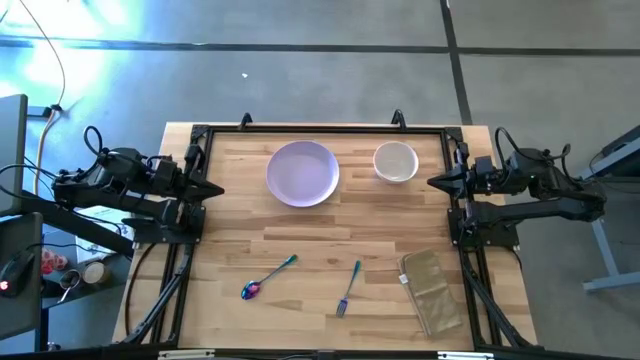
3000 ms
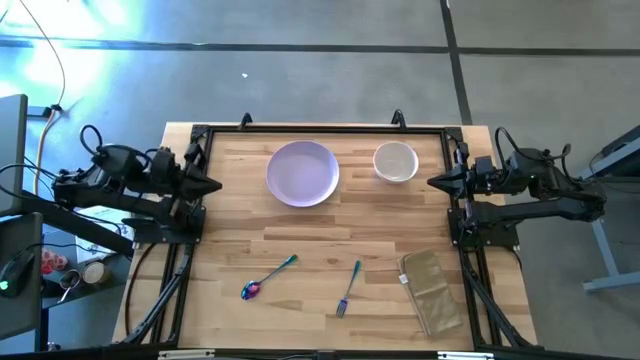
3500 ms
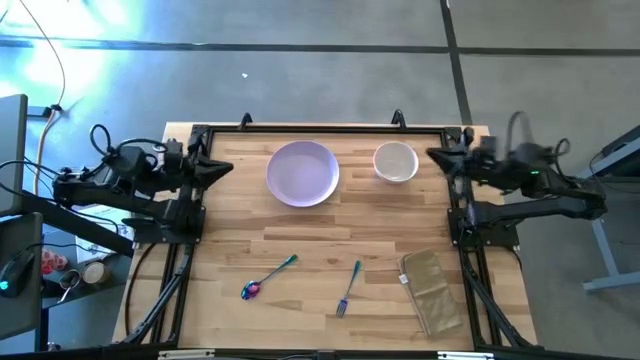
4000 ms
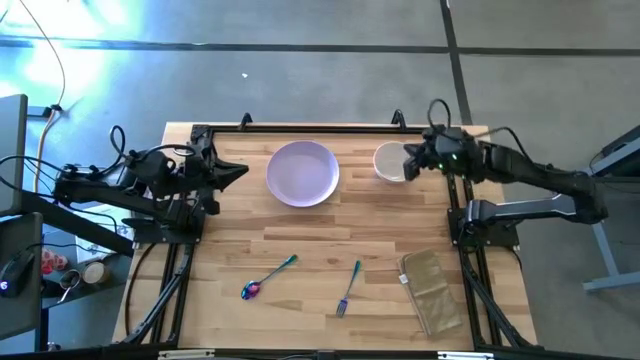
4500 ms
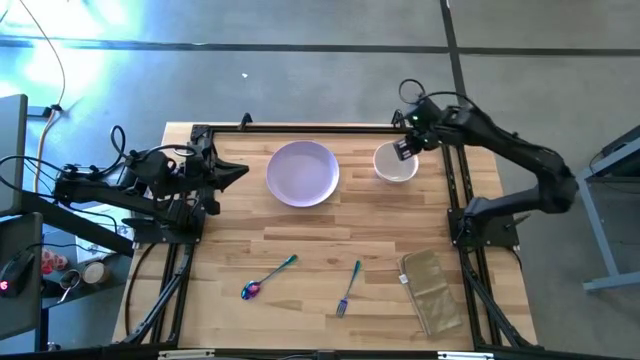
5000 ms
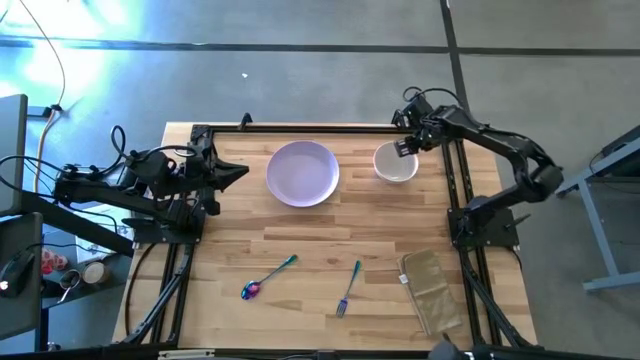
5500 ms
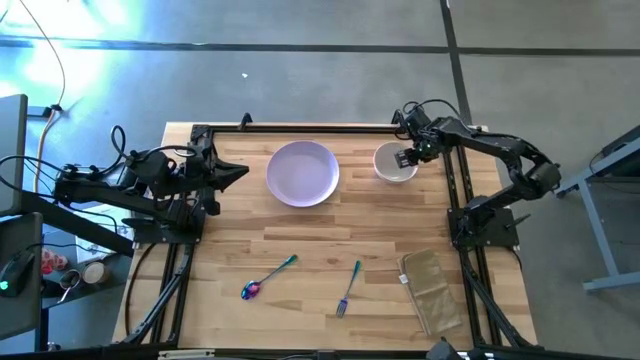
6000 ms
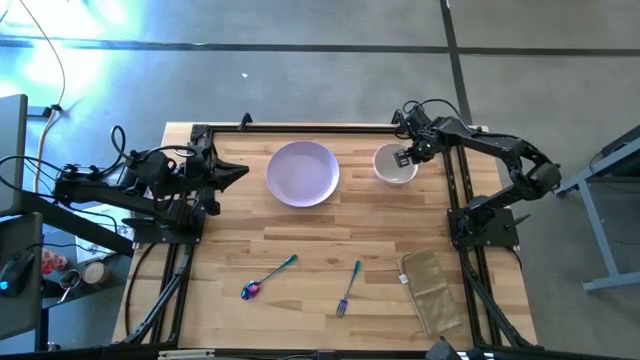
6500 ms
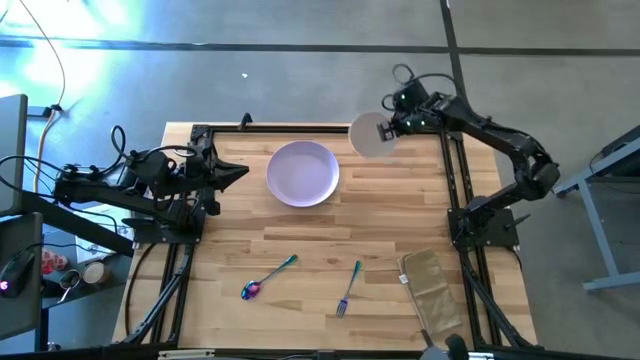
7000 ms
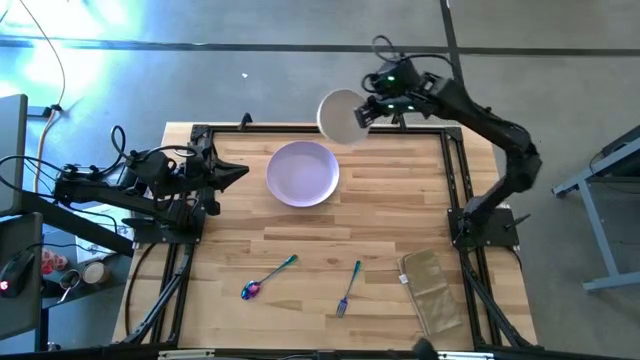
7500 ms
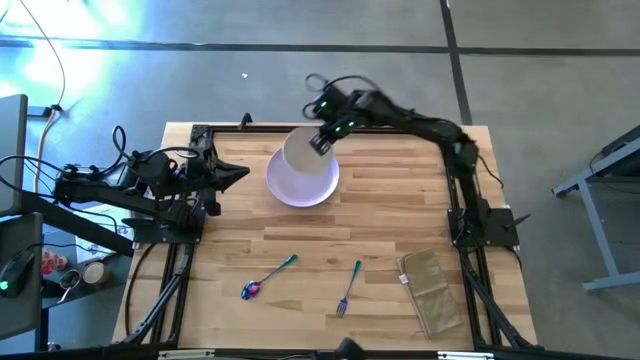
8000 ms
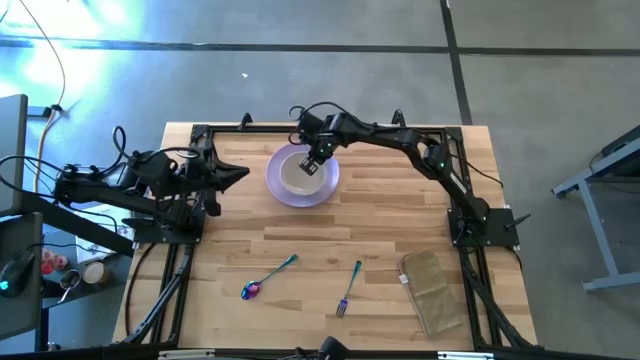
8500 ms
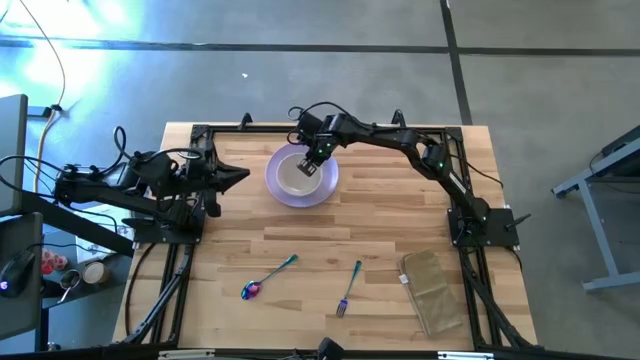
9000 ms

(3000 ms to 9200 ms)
Task: Set table place
Put the white bowl in the center of the violet plate

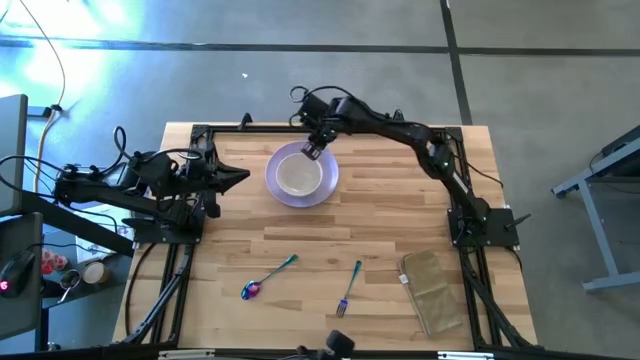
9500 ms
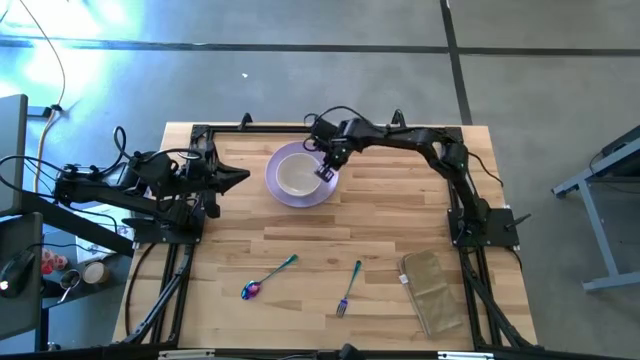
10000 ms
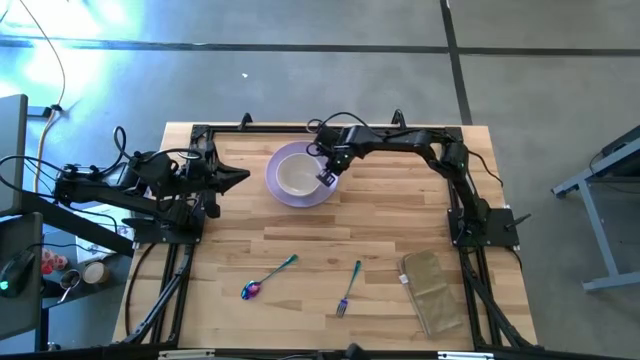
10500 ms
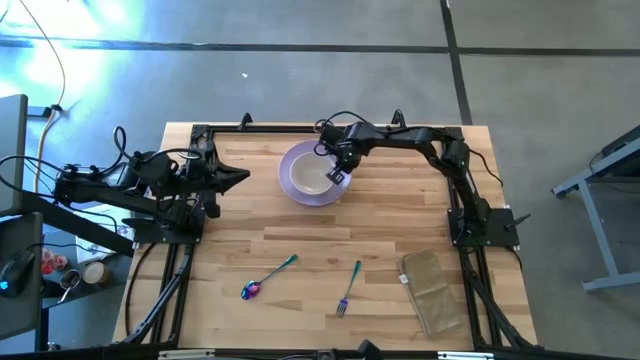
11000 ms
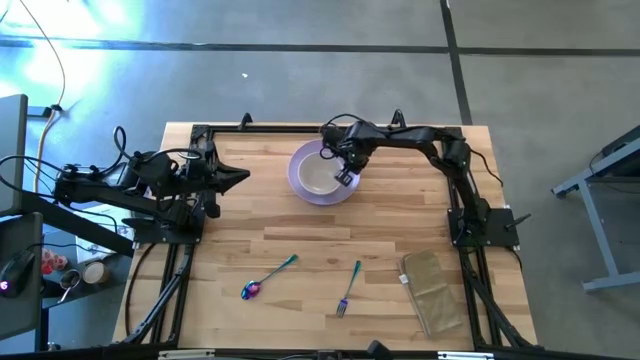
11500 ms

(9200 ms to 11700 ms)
Adjust the violet plate

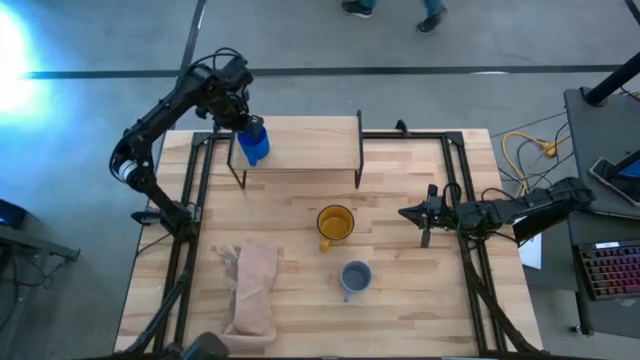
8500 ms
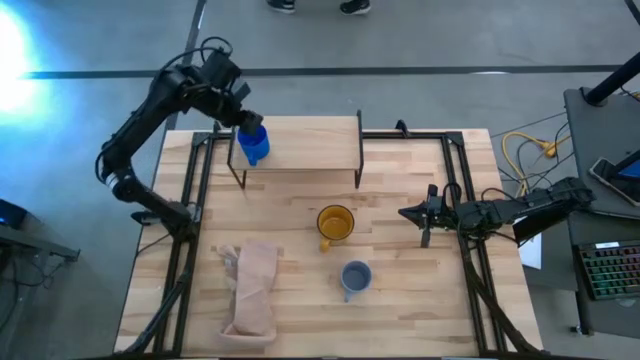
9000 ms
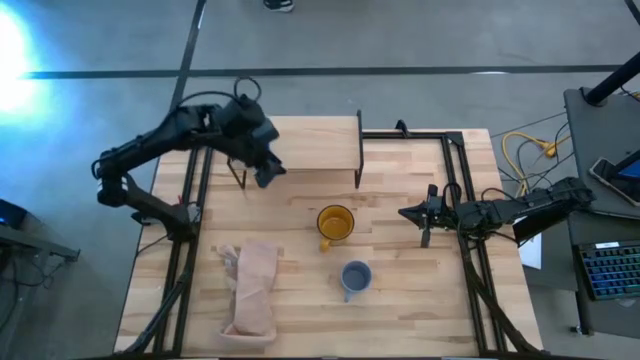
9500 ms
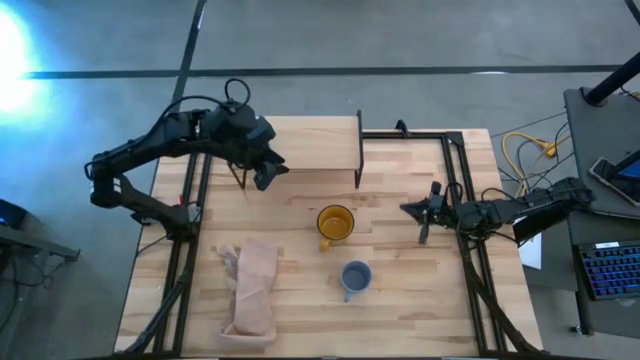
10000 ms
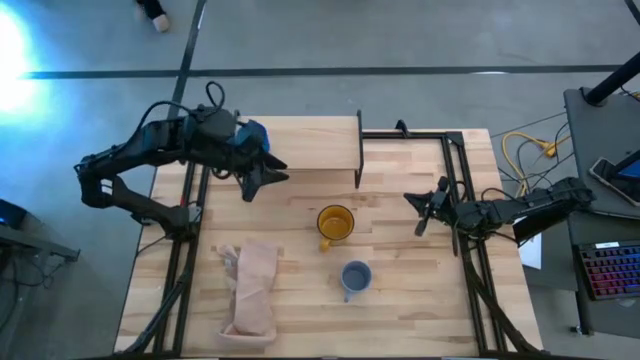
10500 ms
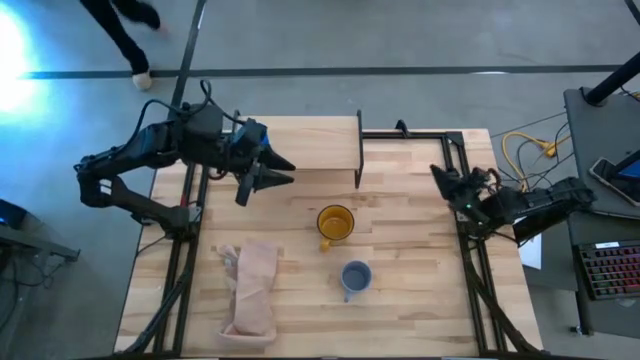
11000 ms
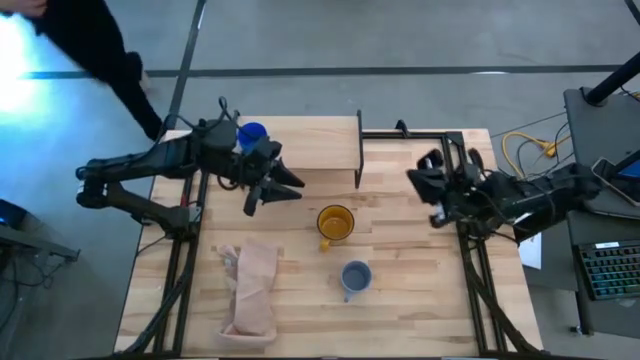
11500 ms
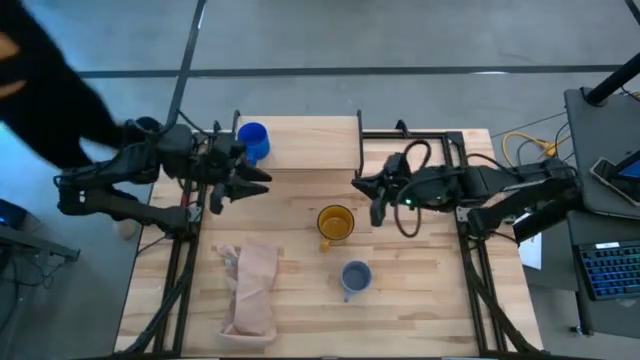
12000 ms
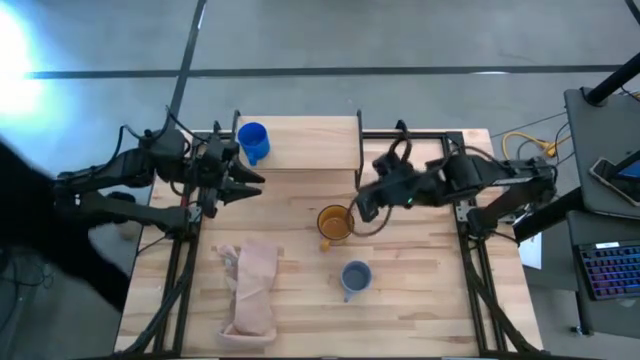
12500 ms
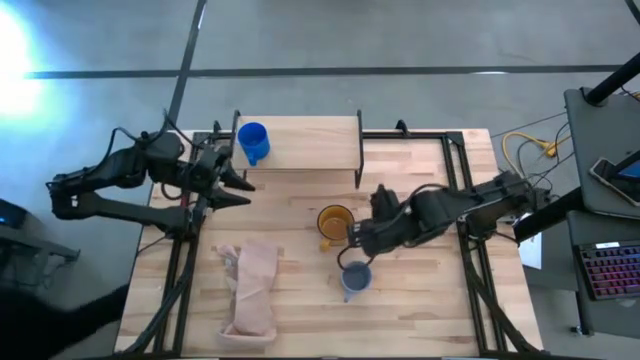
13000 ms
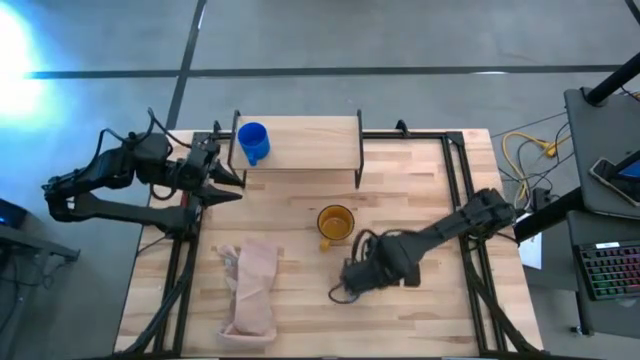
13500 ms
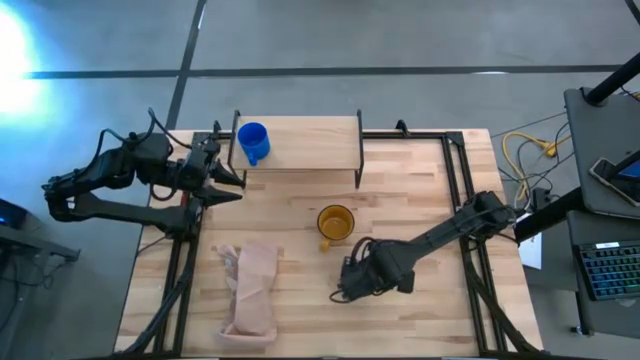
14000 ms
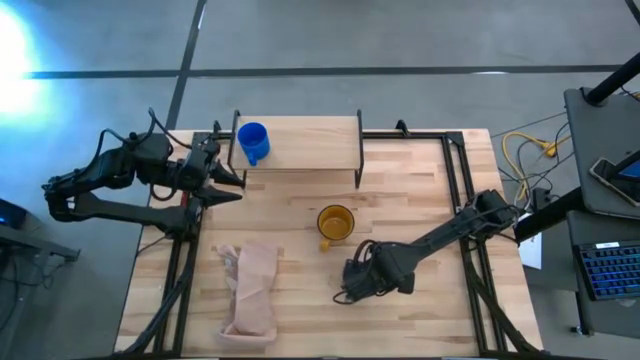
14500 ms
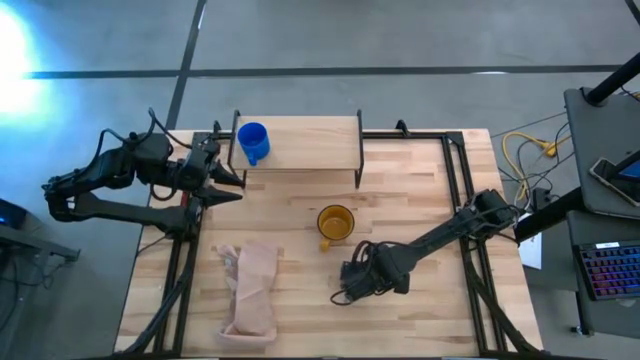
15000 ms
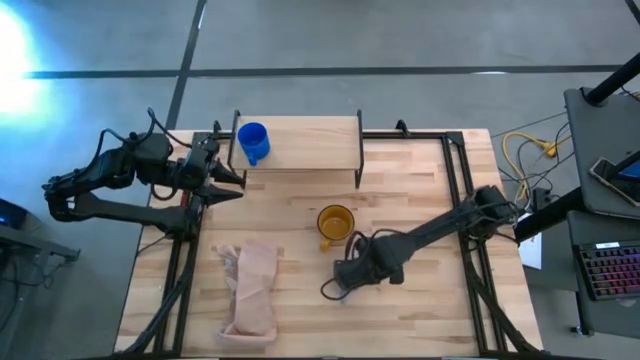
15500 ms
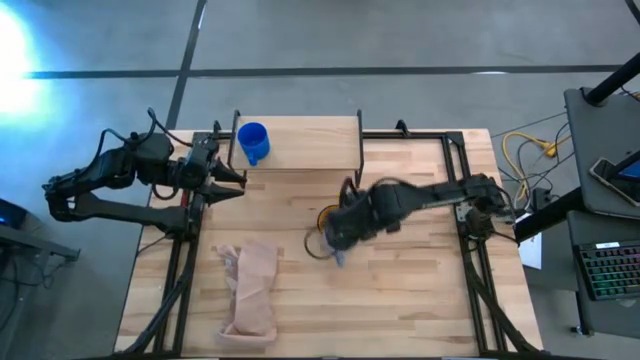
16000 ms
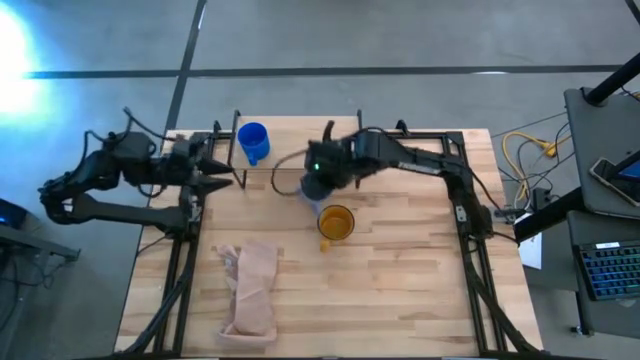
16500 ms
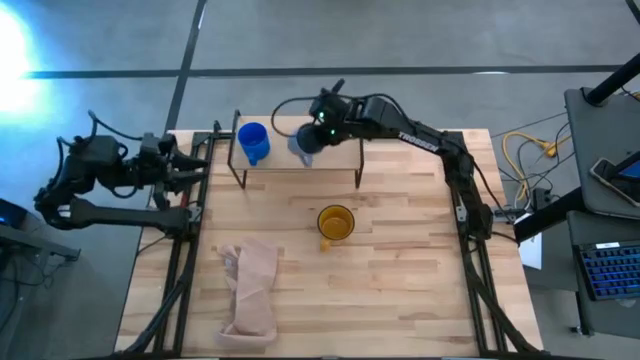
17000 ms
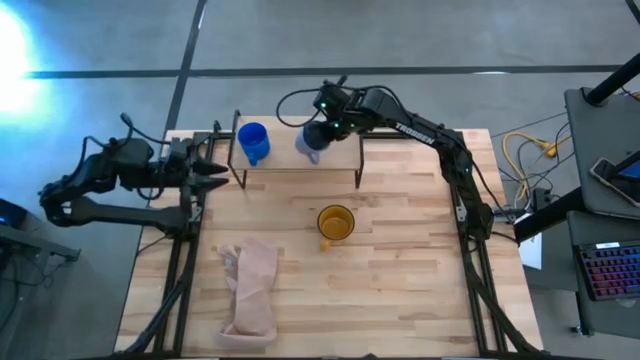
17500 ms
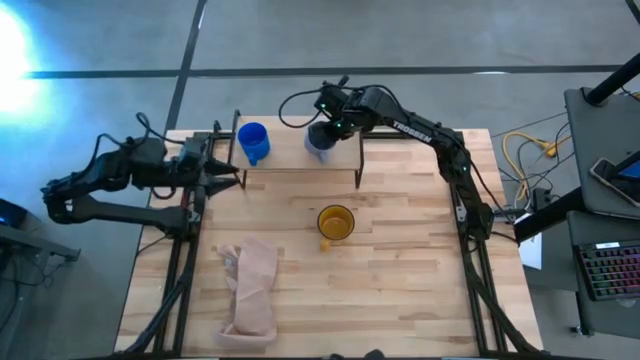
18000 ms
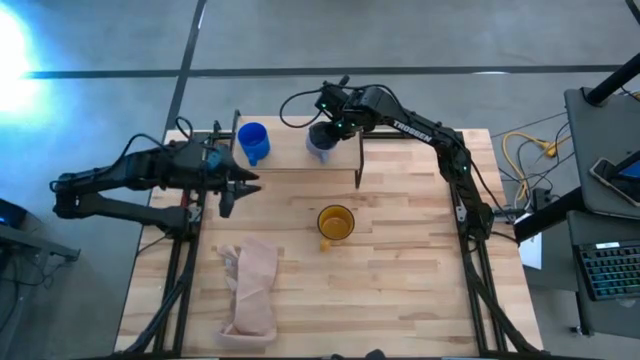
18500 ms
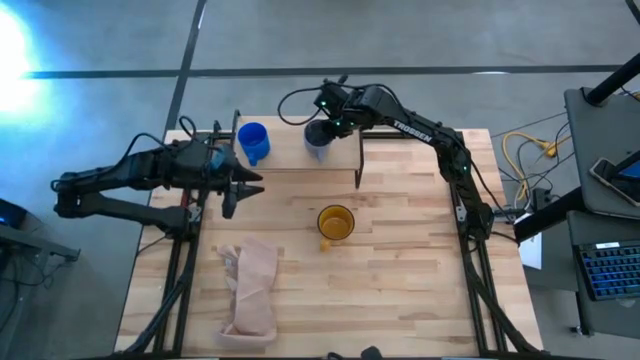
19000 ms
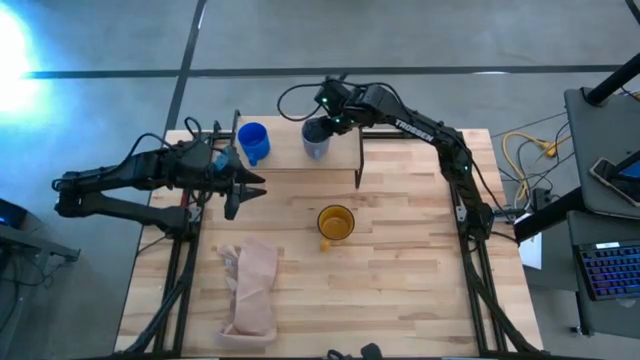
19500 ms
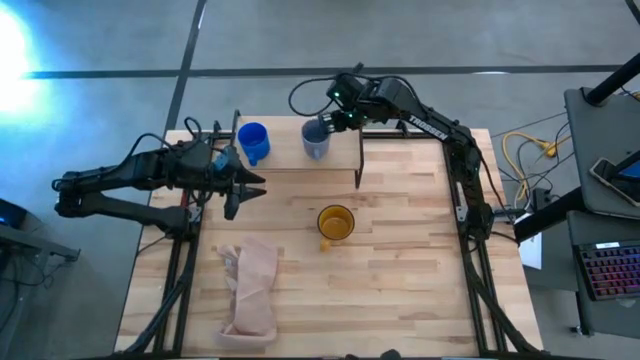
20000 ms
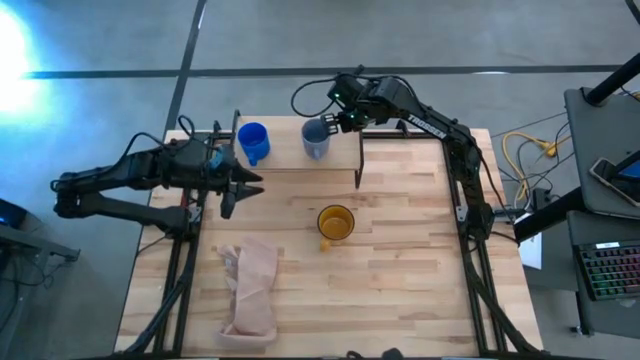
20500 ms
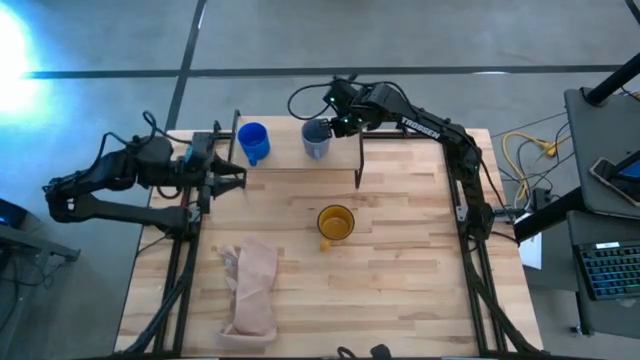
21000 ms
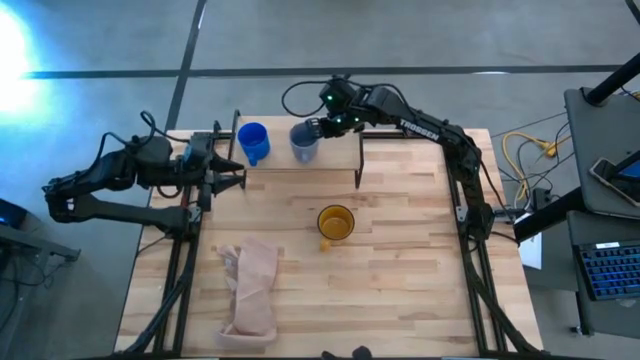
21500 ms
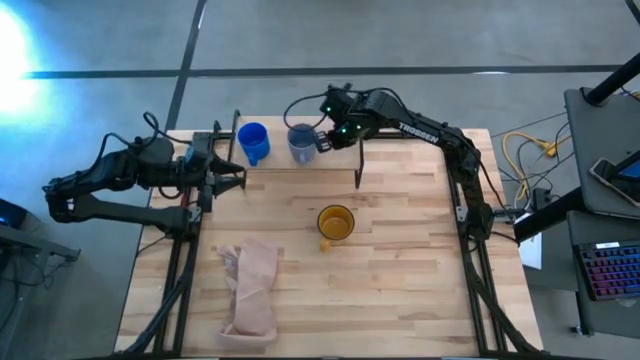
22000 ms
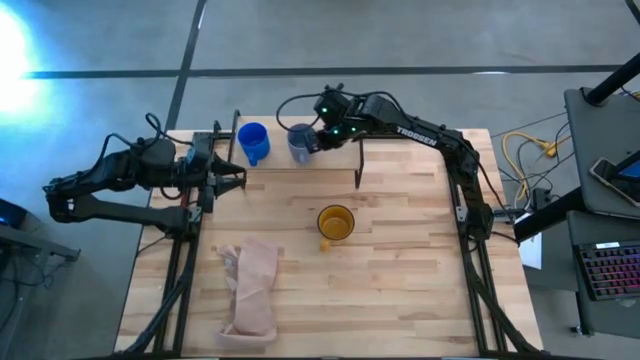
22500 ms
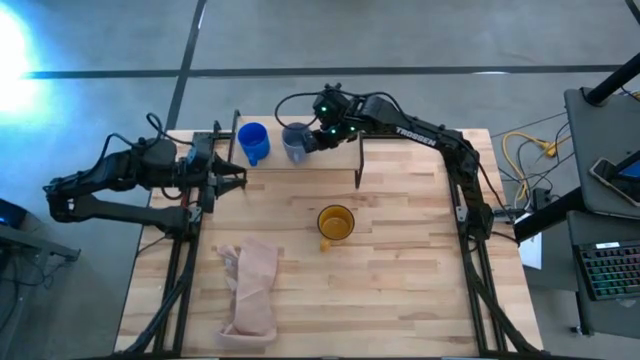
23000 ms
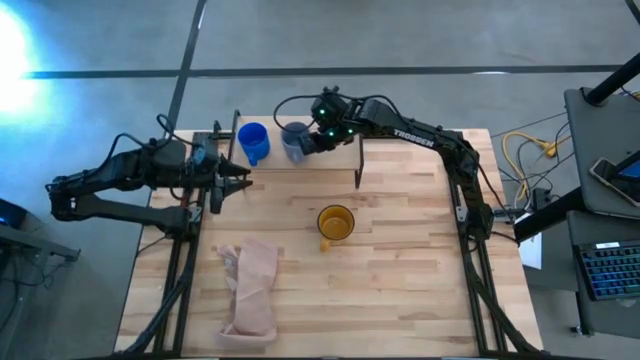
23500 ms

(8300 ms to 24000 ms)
Task: Stack small to large cups/mugs on shelf
Put the light blue mug on the shelf
